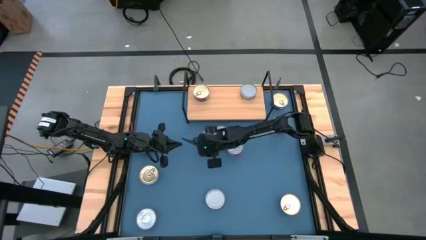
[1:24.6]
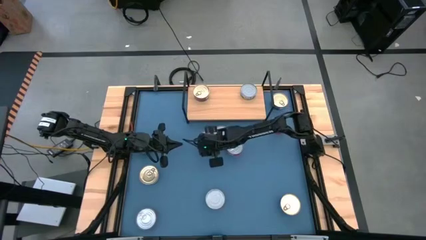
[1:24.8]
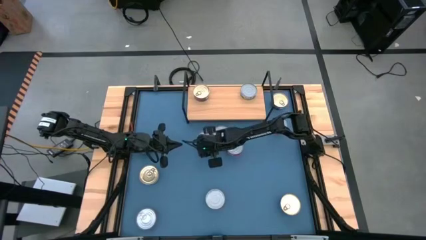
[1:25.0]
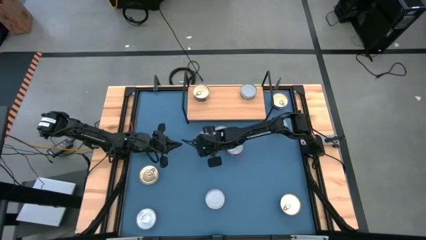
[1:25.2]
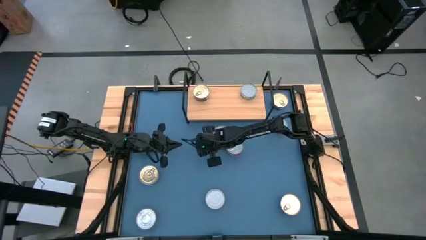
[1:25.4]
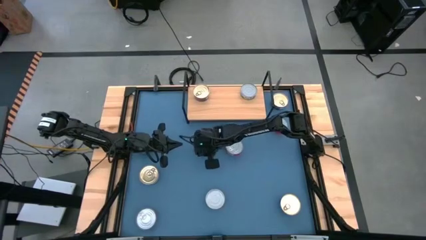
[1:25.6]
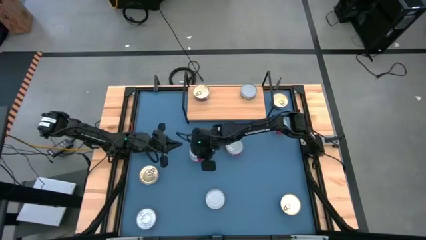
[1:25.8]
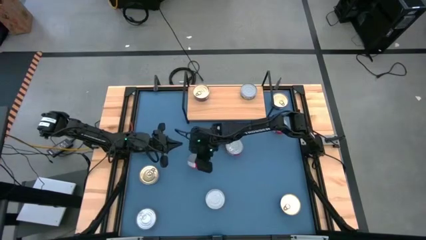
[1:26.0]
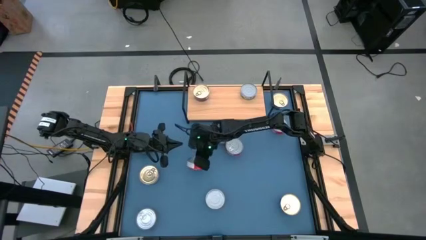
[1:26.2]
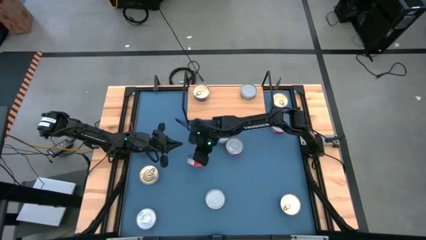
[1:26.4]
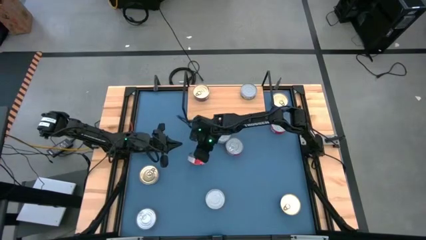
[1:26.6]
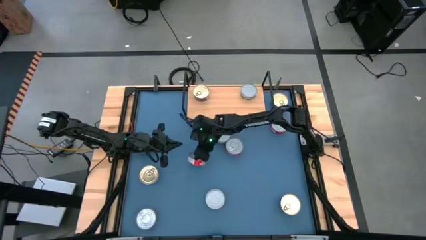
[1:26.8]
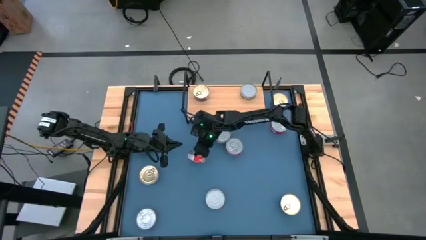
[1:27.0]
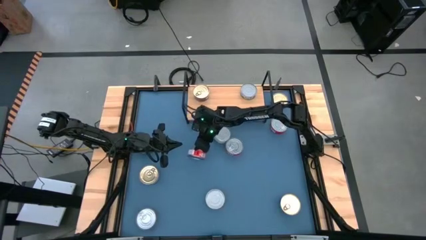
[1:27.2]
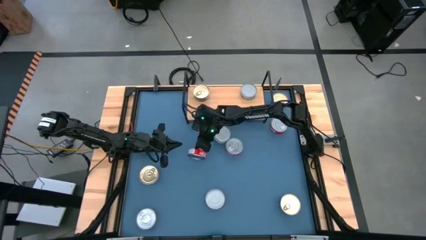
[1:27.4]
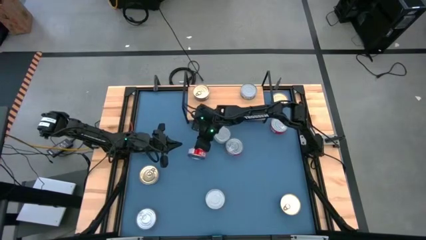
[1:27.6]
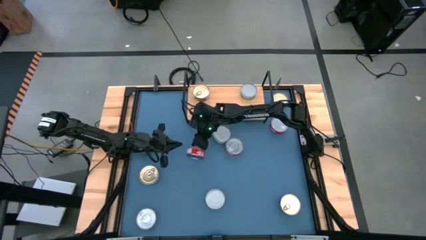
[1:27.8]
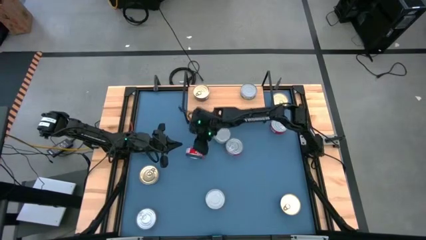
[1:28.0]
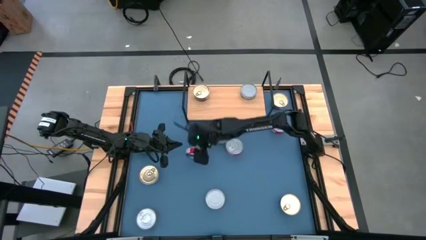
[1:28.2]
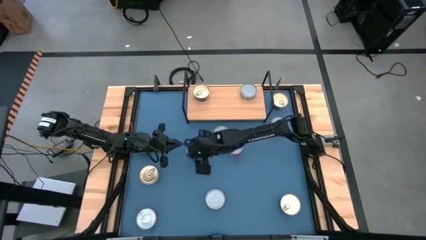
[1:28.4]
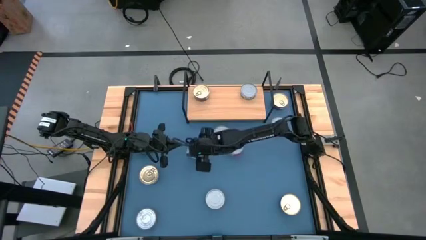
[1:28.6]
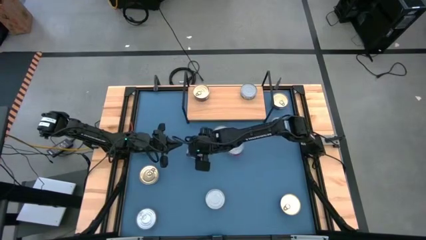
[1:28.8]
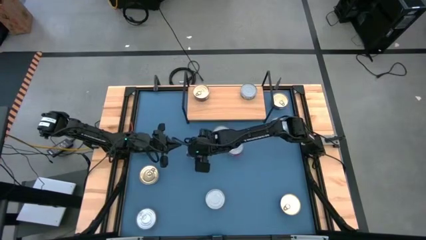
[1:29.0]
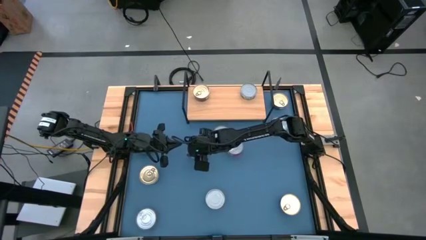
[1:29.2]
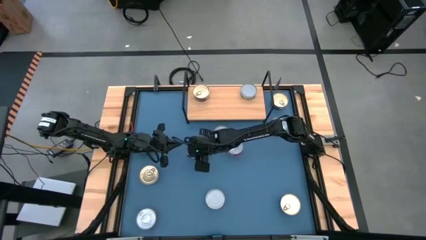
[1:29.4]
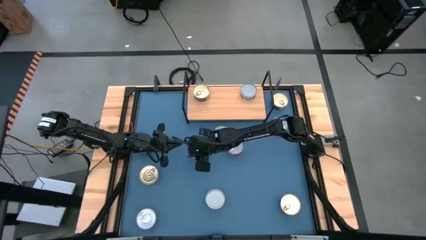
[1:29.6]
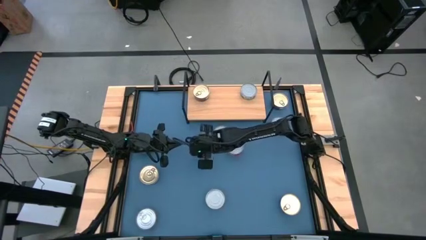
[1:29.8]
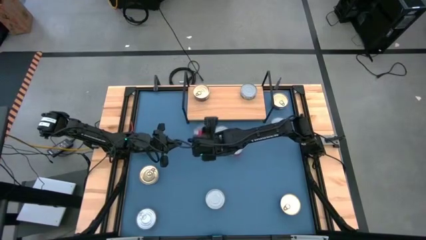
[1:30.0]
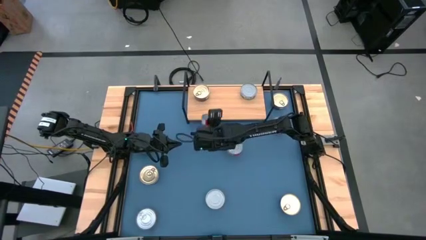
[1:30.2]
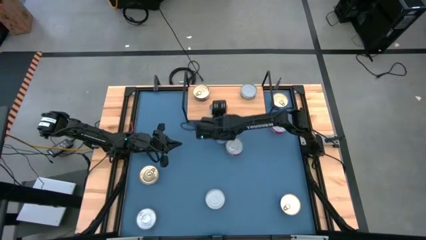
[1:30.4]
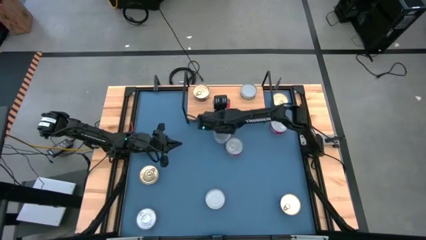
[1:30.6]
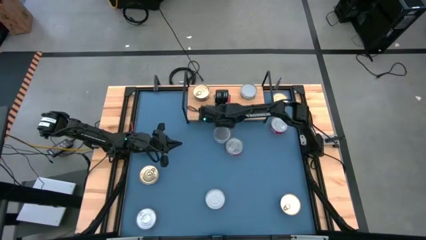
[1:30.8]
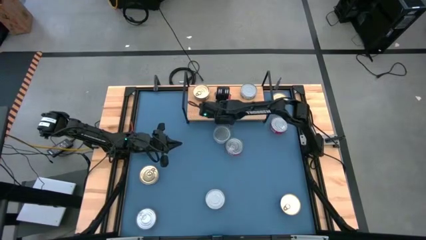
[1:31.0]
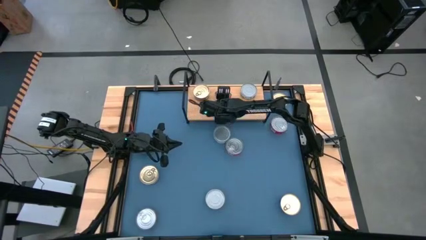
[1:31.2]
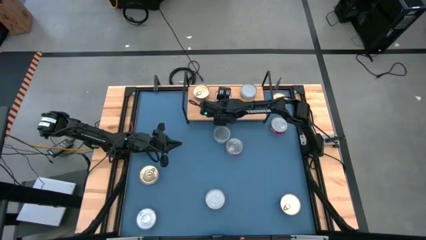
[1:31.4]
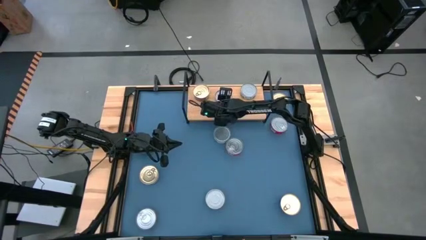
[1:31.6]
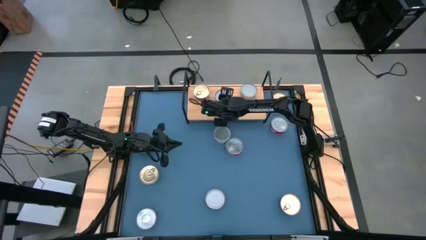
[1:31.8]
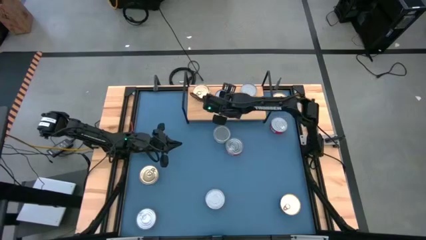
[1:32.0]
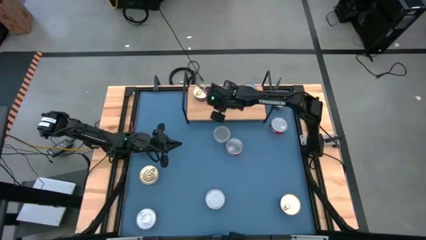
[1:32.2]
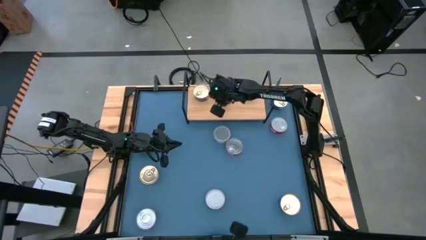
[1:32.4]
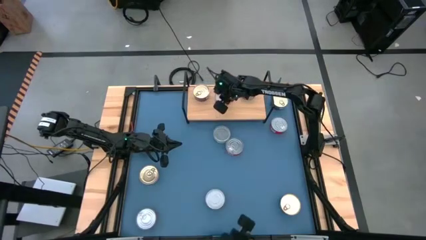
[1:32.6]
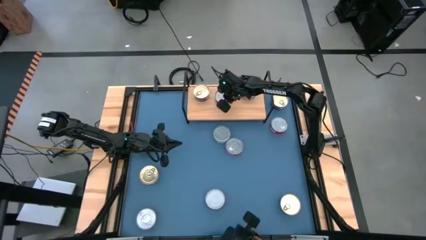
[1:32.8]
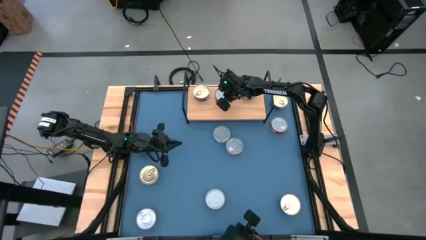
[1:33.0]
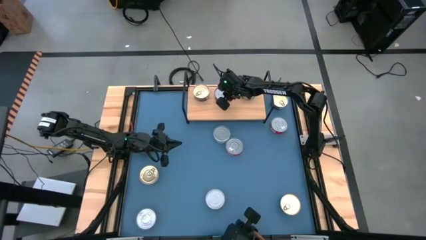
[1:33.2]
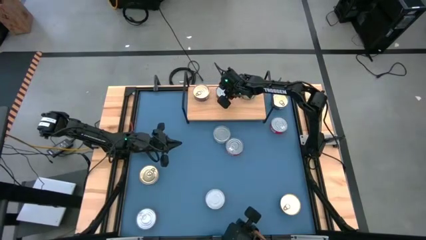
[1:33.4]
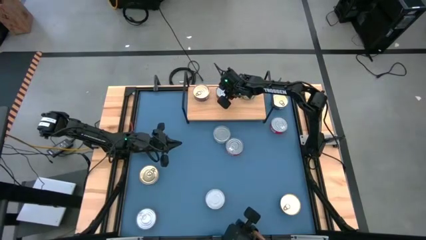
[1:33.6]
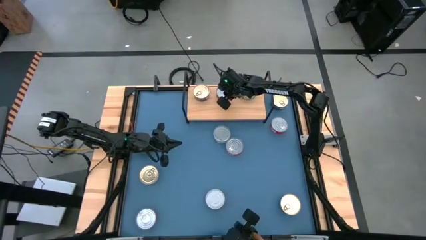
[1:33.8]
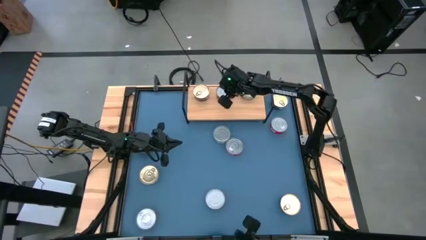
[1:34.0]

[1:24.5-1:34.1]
Task: Stack canned seafood by type on shelf
Put the red tuna can on the shelf

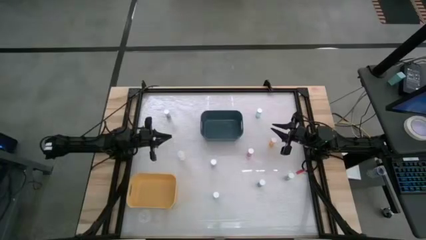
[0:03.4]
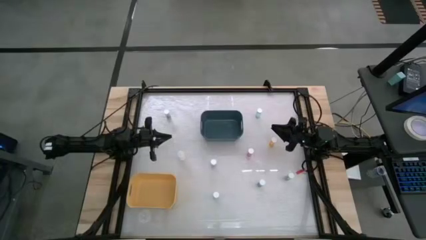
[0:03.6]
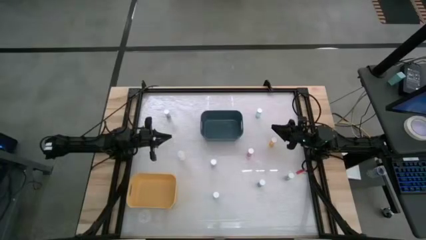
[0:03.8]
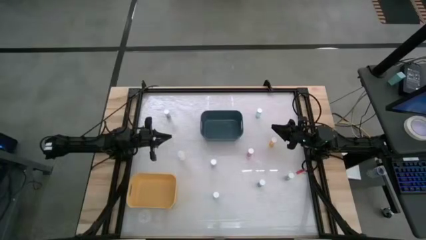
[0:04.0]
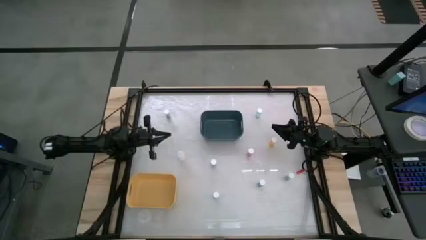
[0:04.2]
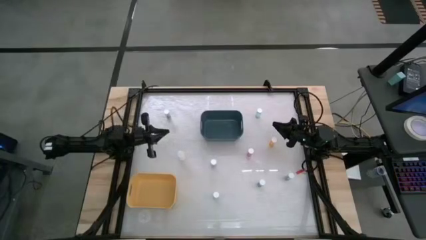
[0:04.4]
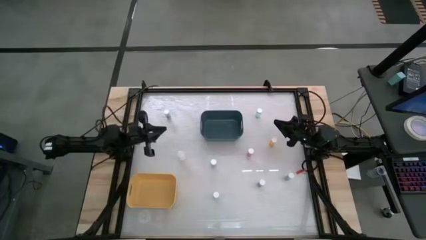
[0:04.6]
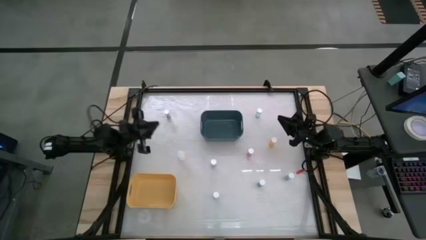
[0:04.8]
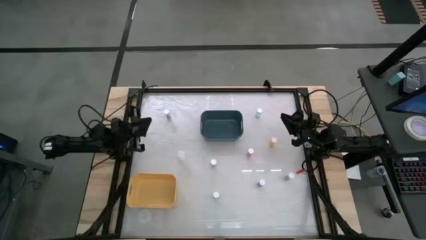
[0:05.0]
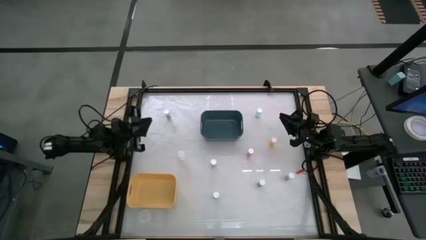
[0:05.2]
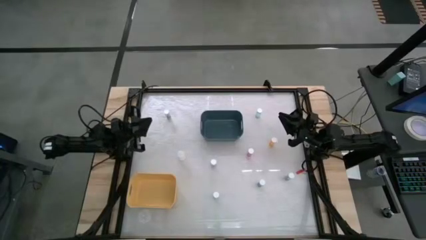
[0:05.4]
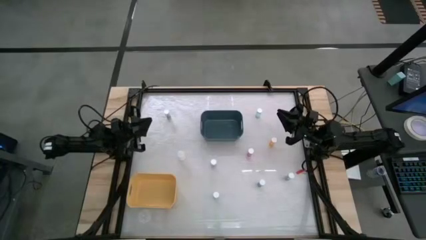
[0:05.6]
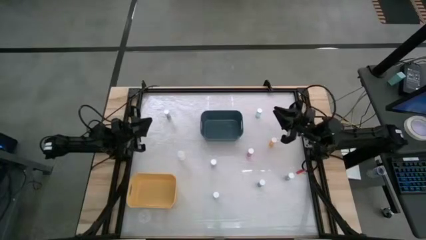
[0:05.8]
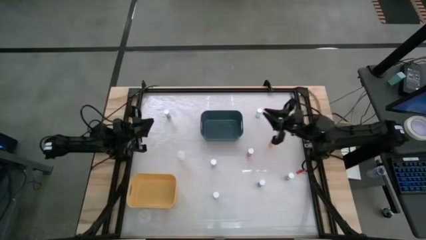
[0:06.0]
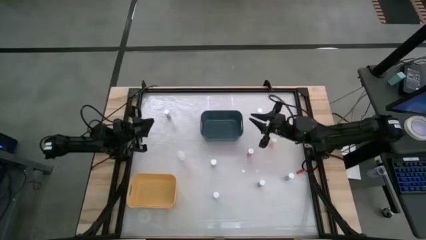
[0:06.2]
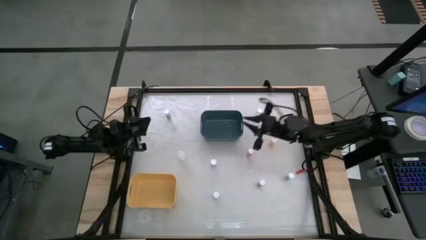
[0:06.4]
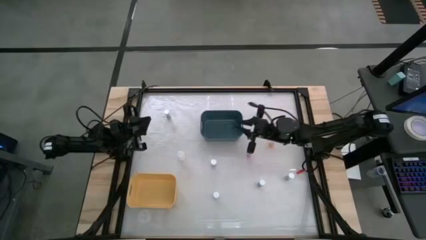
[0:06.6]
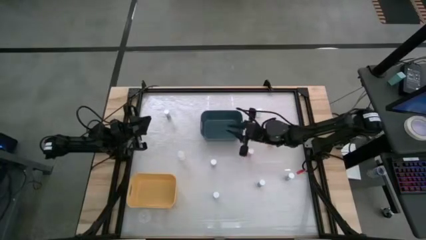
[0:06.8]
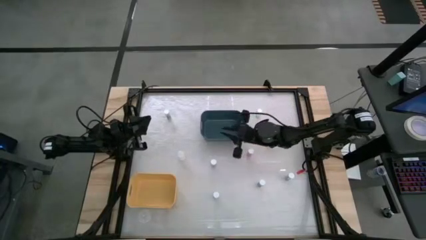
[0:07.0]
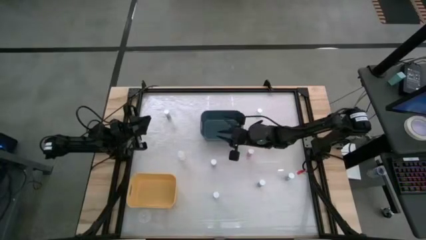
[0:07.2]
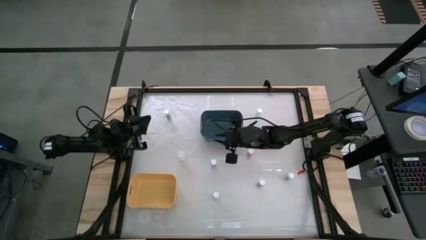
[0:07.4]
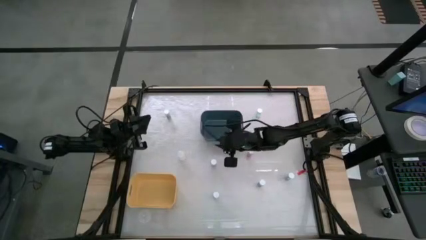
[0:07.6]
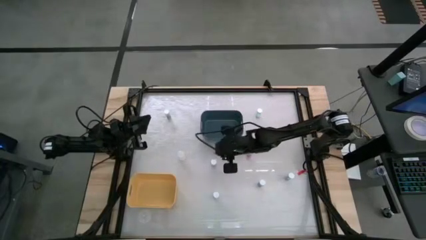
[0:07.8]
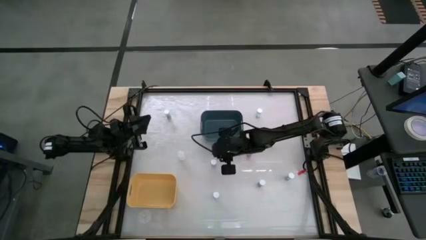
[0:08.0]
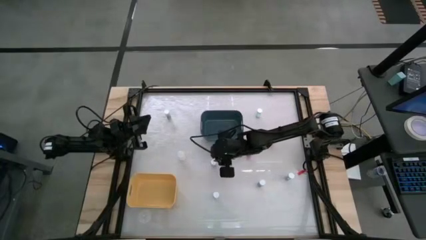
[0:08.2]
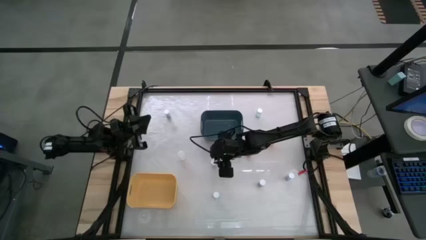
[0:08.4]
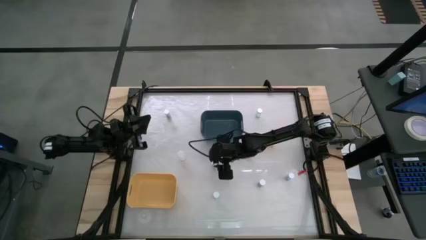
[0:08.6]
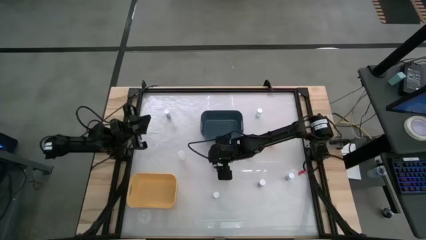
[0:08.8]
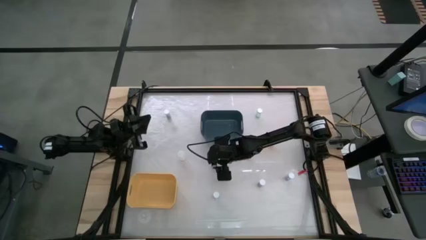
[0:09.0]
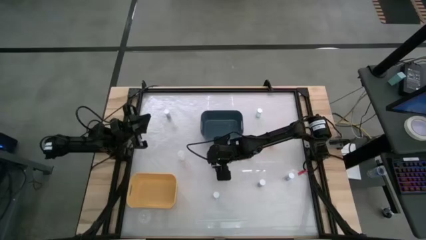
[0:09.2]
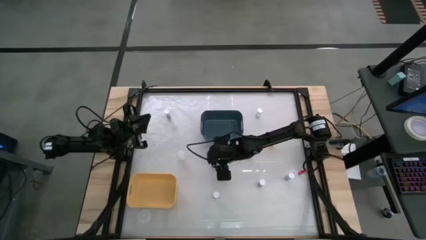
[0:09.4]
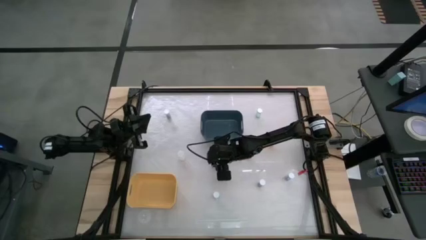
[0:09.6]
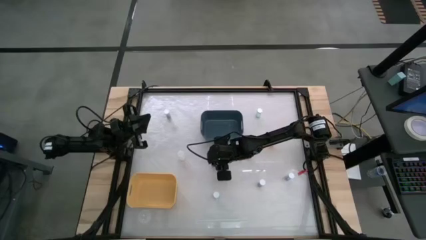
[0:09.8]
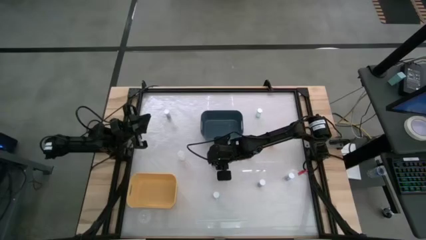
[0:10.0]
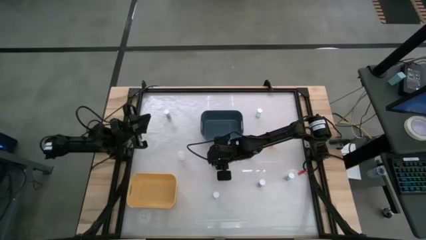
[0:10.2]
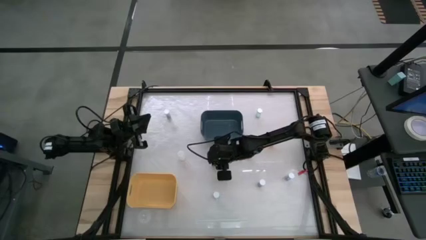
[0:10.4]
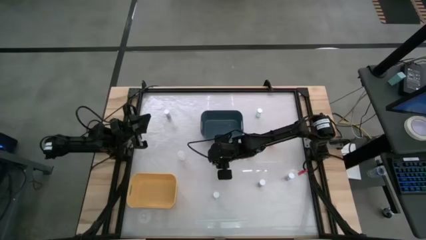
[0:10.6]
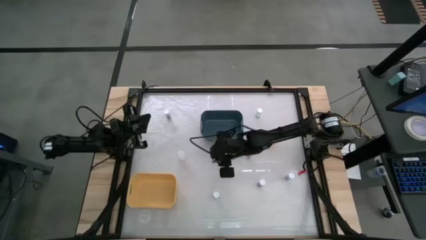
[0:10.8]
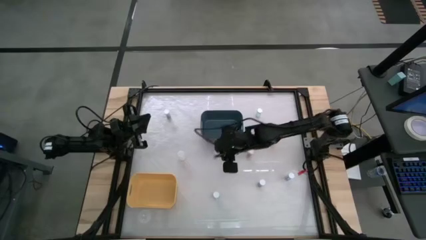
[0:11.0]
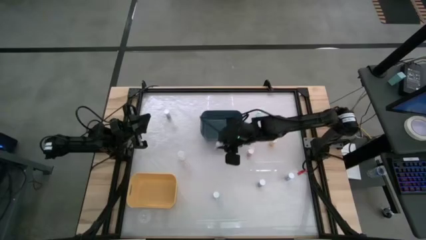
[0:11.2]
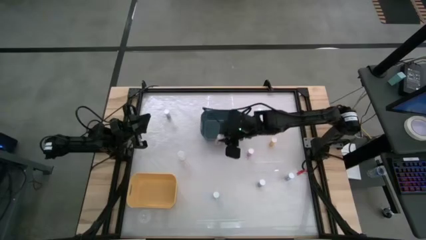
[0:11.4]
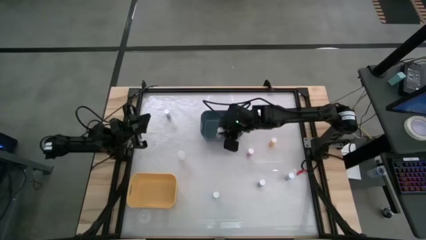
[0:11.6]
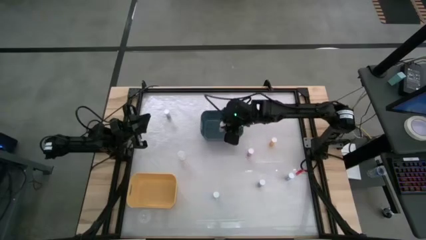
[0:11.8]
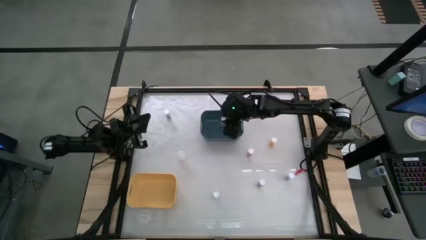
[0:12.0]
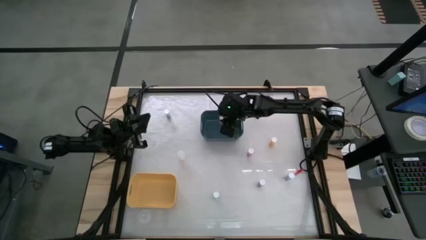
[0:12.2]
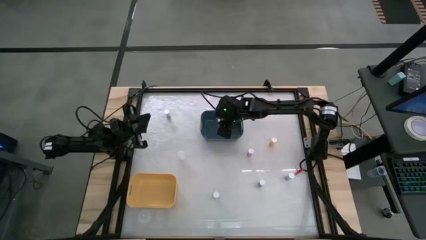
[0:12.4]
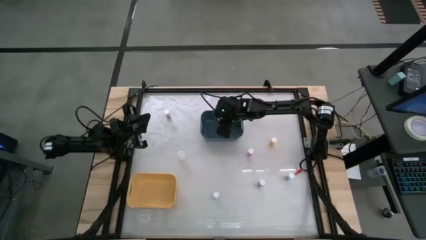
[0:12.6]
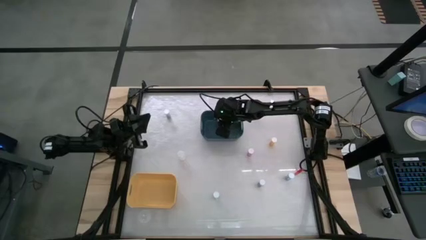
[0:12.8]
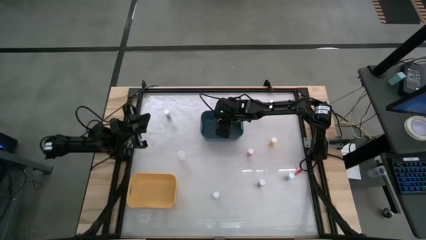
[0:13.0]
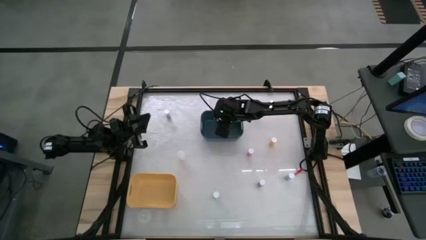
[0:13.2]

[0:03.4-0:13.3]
Task: Pick and place medicine bottles into bin by pill shape (circle, oval)
Put the green capsule bottle into the blue bin
